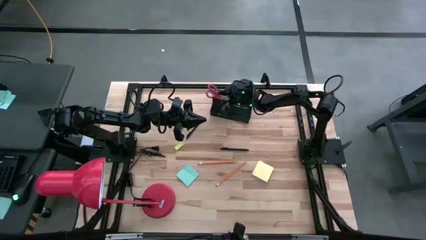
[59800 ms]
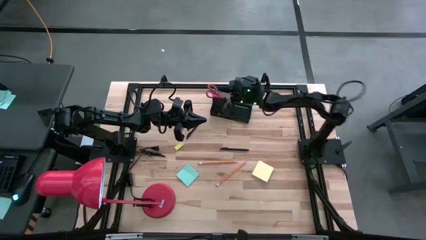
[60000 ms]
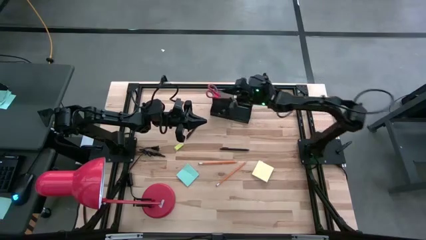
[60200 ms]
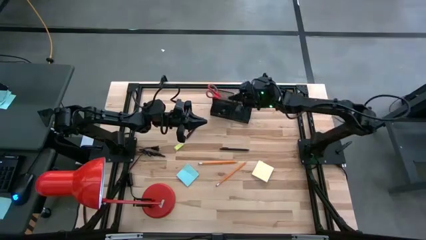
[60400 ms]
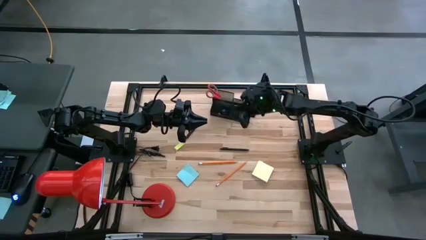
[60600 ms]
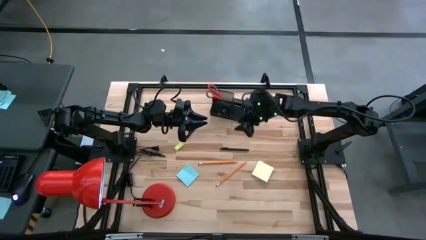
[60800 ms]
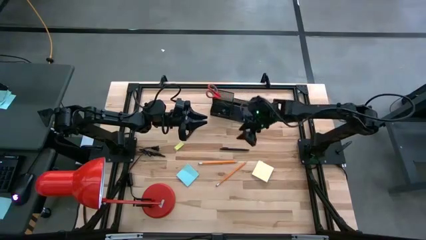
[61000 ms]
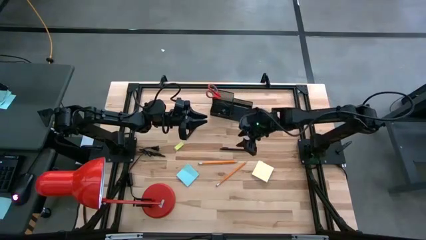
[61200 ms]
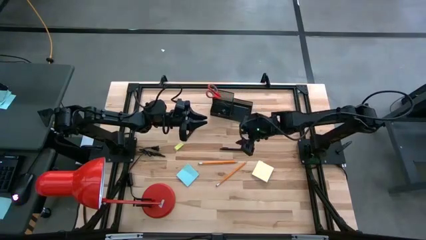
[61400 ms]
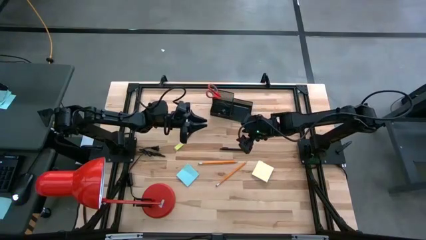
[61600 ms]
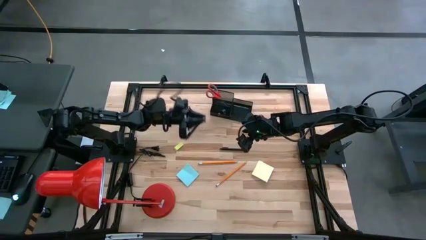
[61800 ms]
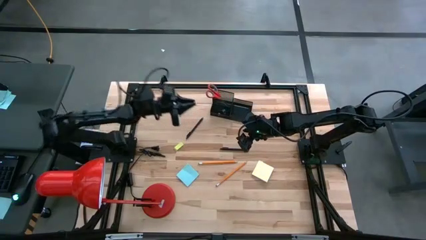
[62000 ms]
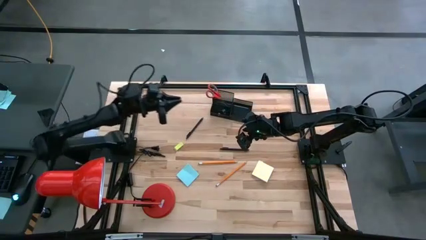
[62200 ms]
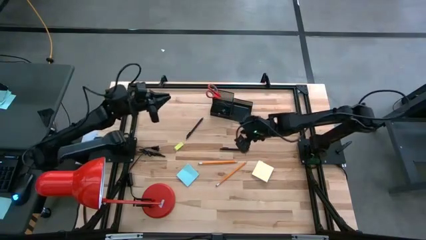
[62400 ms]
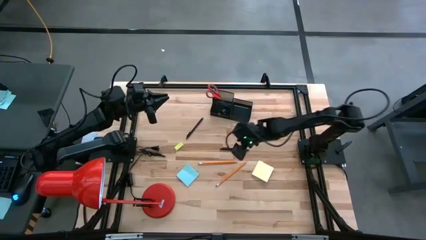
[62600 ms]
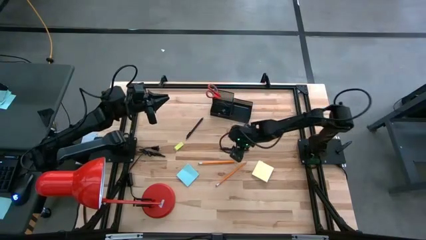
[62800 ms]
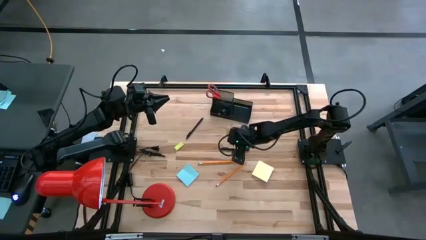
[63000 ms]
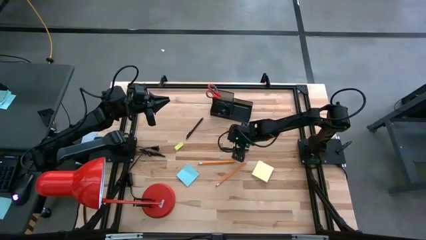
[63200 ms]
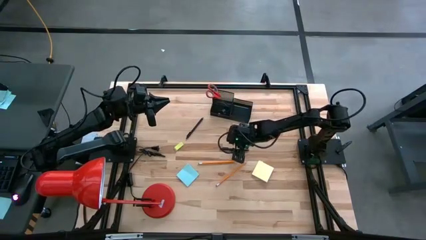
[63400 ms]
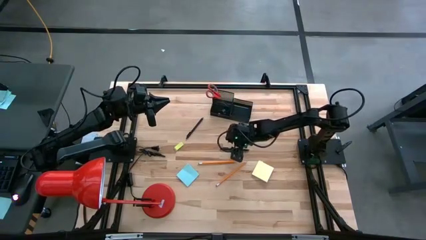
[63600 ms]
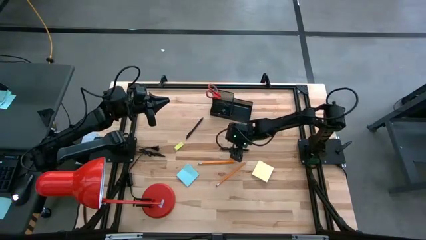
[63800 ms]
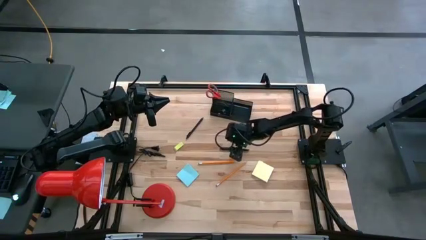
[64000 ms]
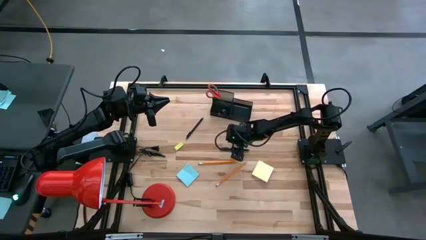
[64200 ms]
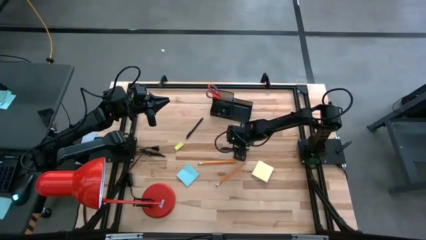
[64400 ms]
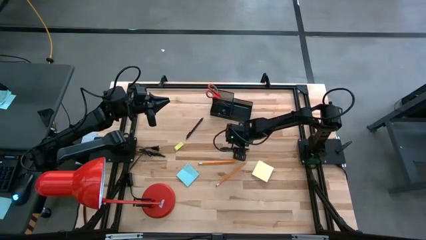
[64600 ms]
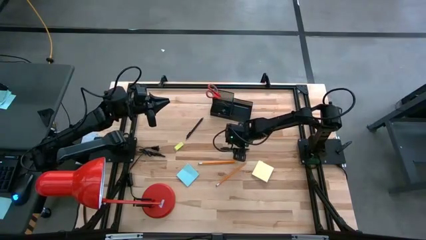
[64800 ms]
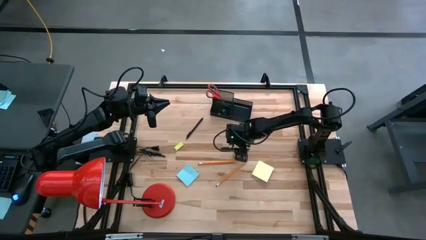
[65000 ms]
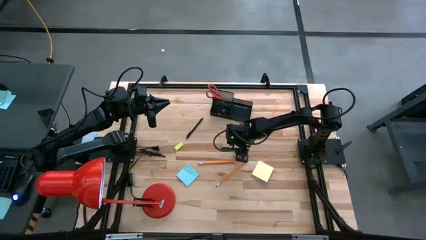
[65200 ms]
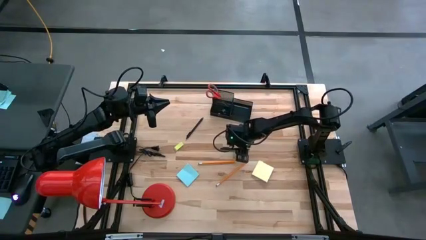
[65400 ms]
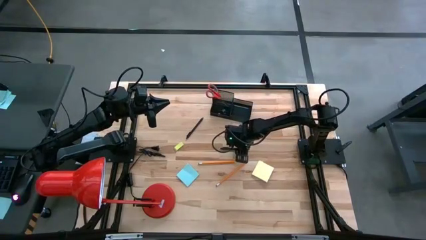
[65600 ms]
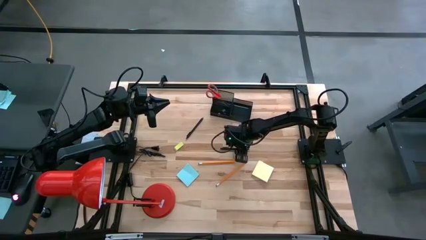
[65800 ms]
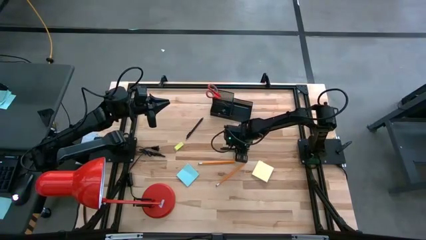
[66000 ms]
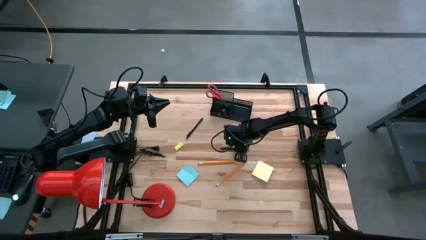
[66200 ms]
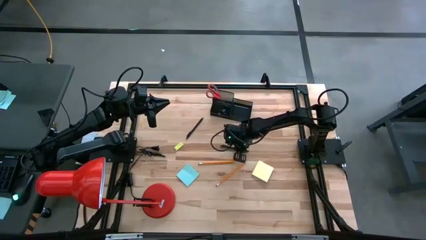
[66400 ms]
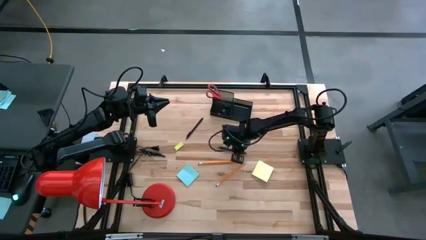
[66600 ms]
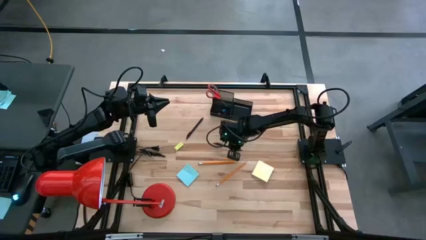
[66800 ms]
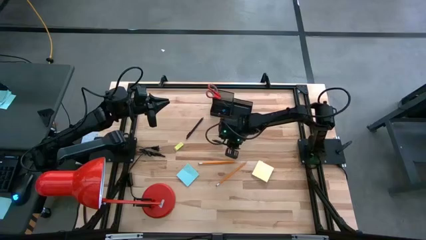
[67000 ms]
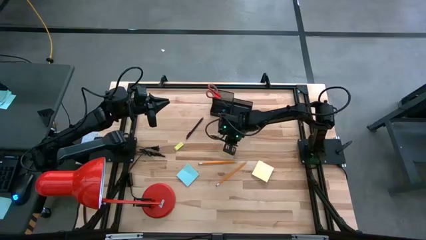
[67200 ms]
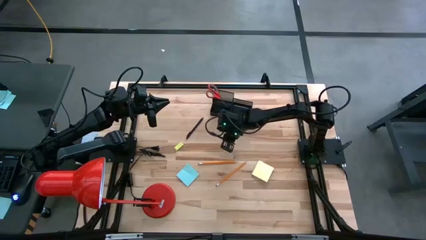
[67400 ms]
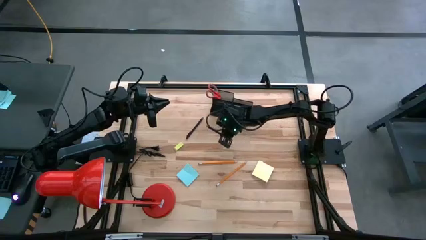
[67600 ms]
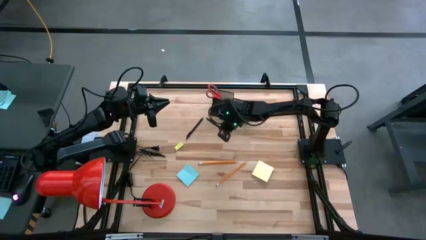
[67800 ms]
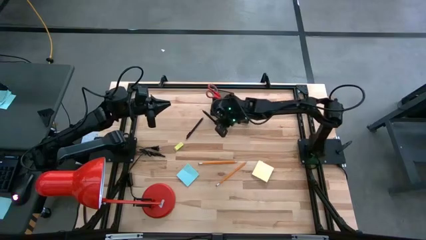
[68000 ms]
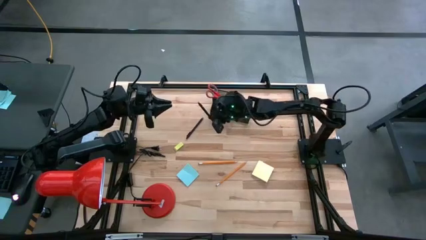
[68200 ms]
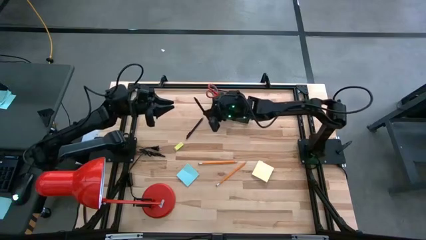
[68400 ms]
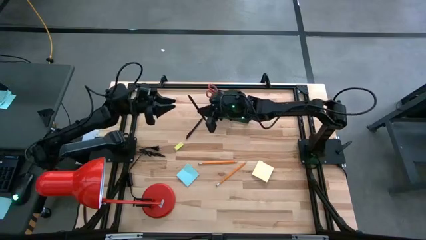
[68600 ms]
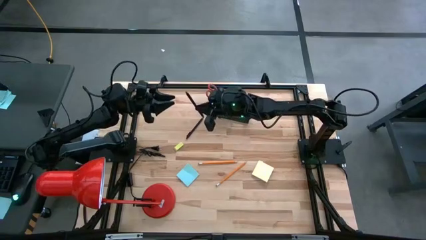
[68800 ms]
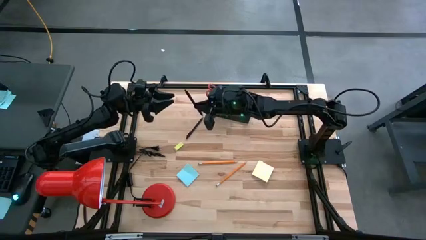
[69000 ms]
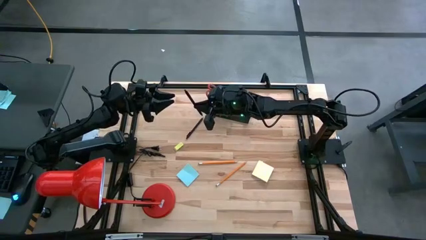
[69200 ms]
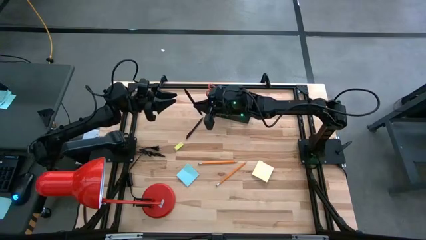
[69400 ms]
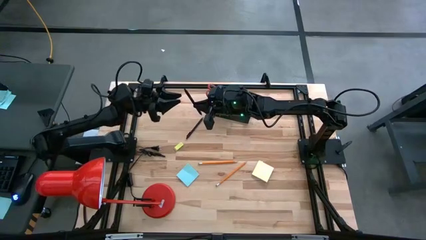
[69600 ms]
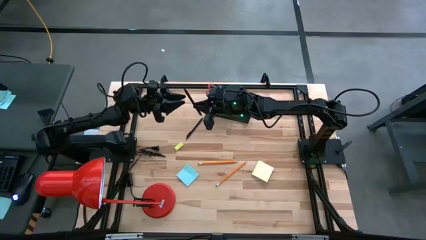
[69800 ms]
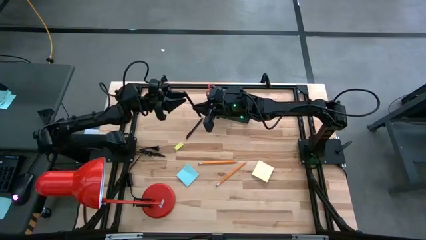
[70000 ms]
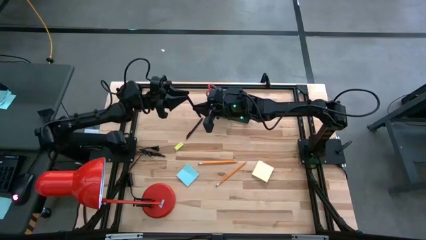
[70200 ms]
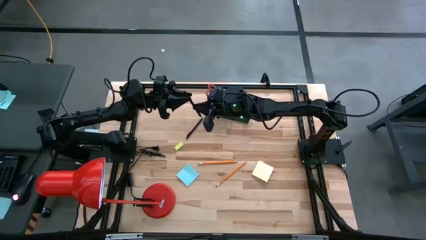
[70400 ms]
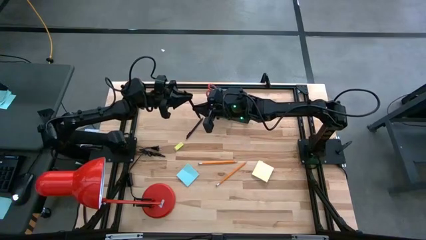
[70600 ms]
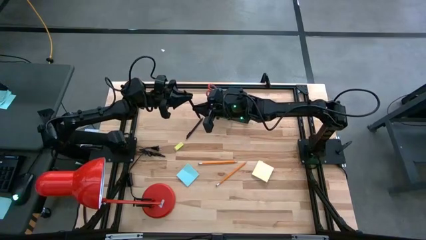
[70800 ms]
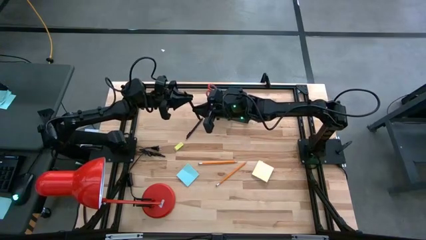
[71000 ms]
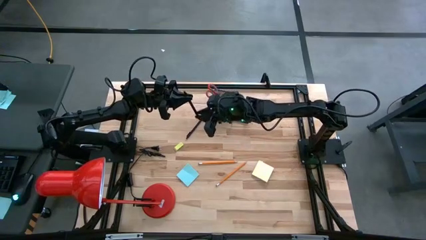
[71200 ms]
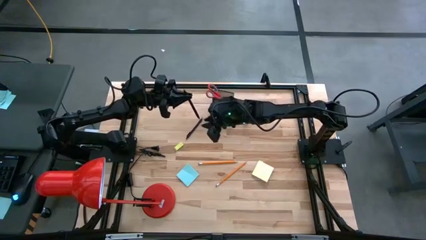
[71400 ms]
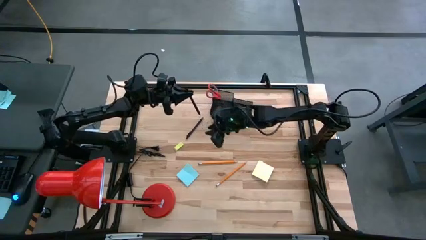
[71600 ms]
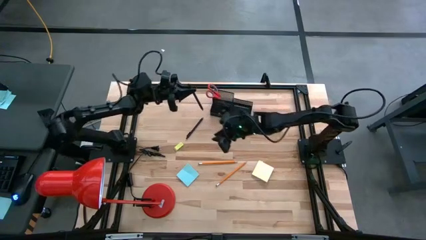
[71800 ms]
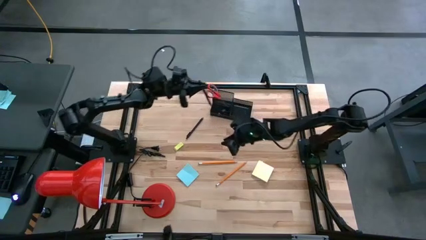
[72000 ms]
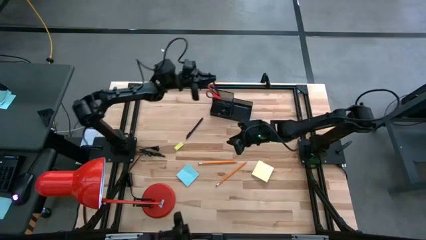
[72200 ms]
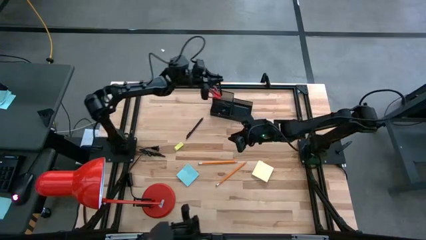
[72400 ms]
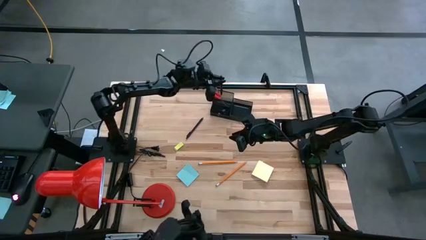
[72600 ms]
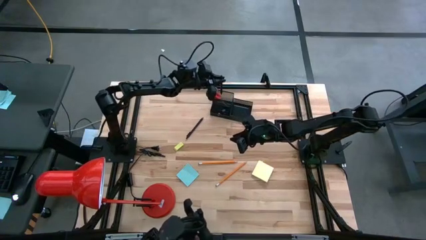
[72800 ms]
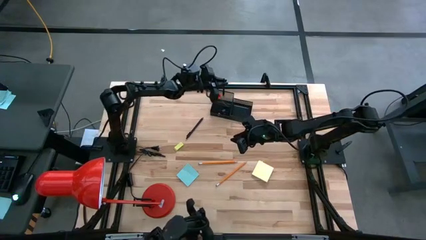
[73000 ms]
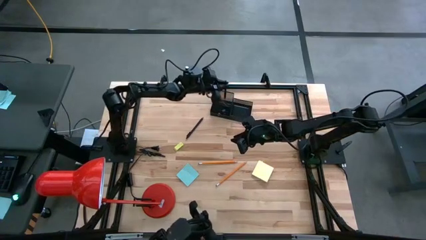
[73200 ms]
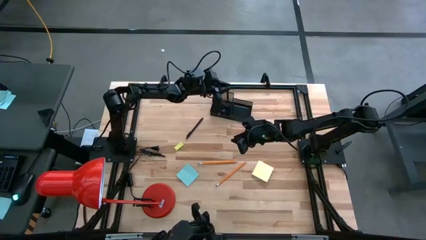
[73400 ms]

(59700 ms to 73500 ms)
Task: Pick and place office supplies into organizer
Put the right black pen in the black desk organizer

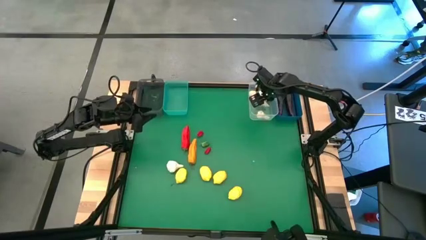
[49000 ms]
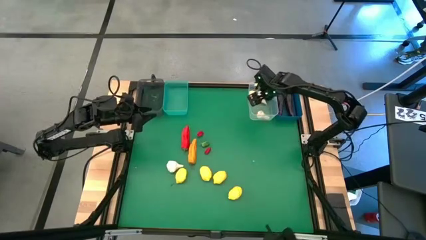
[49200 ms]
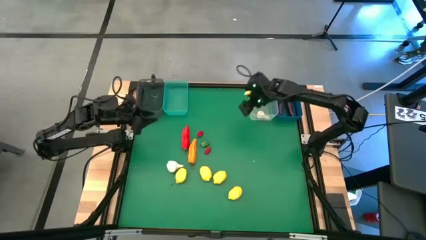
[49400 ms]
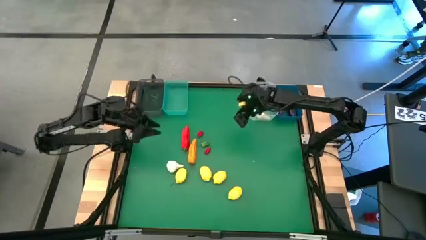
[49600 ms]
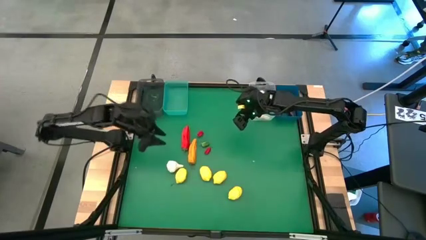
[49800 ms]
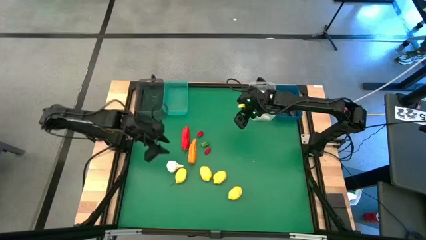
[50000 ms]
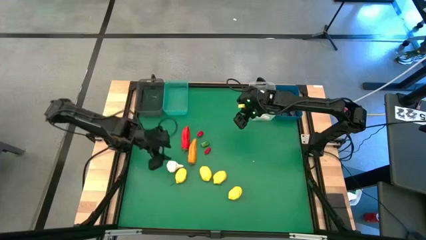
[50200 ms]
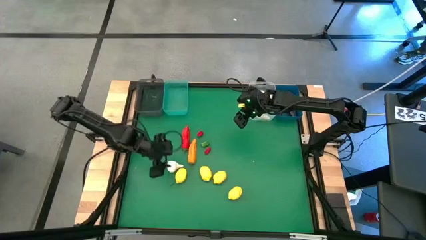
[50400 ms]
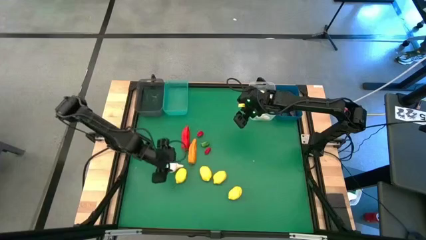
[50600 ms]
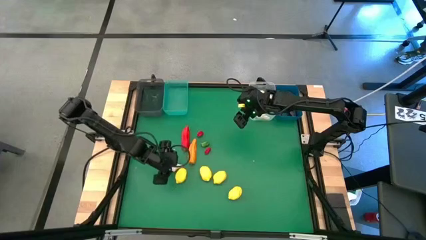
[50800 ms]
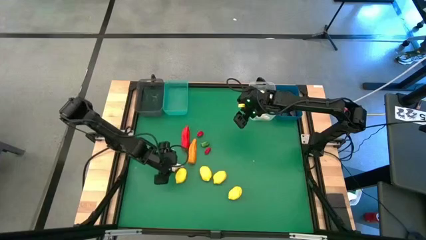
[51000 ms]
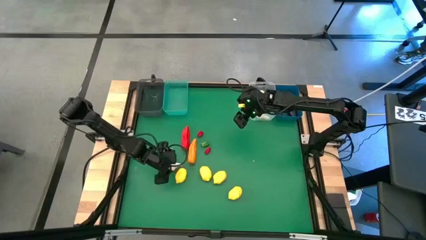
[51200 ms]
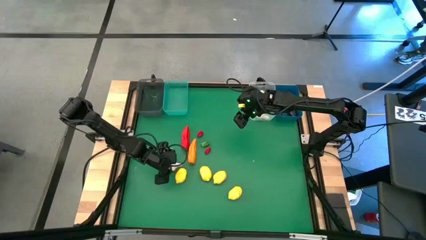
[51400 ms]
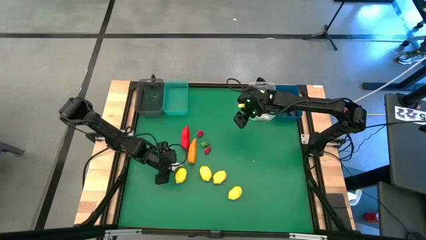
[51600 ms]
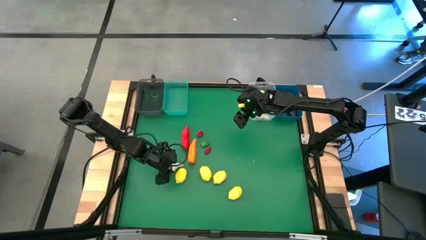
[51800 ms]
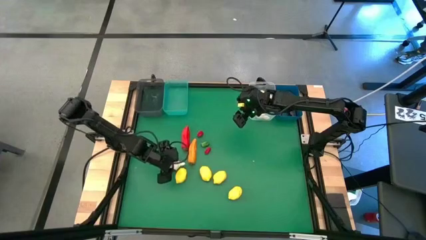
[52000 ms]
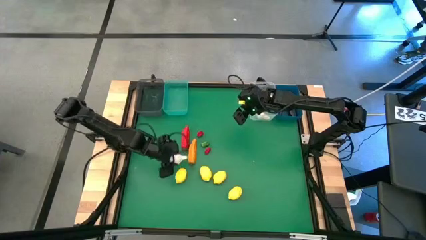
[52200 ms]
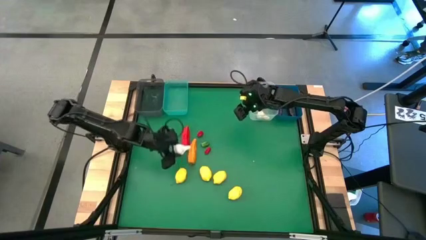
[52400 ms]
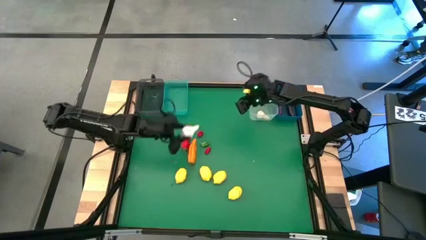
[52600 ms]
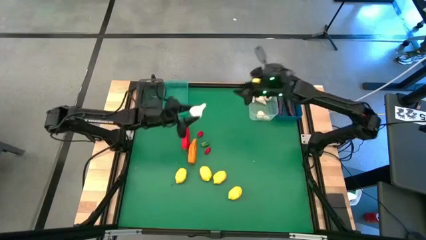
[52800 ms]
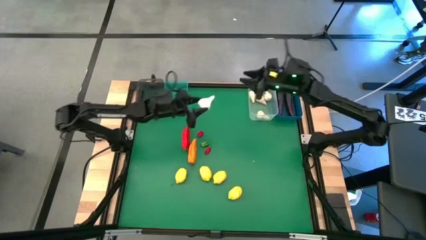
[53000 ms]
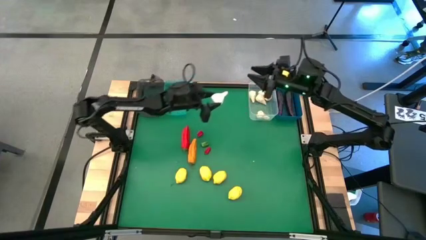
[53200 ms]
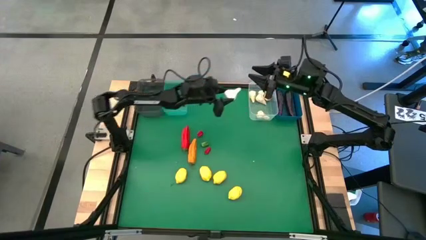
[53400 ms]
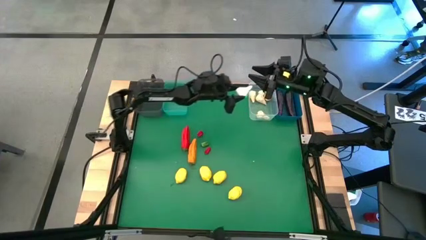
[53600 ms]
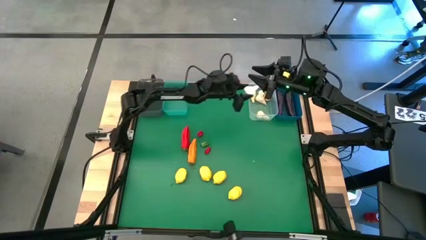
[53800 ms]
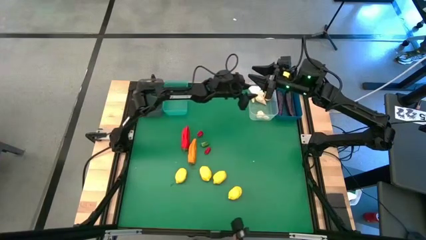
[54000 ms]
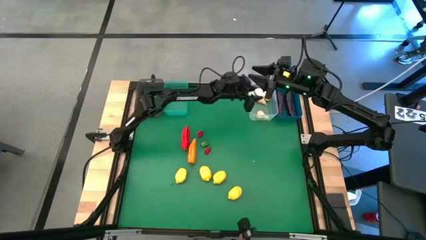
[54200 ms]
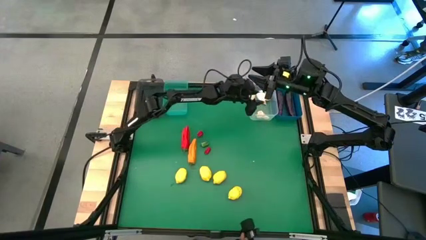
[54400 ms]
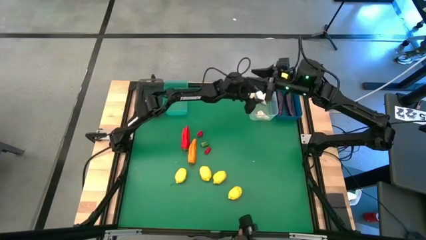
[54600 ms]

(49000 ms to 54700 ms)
Task: Sort produce into baskets
Put the garlic into the transparent bin
